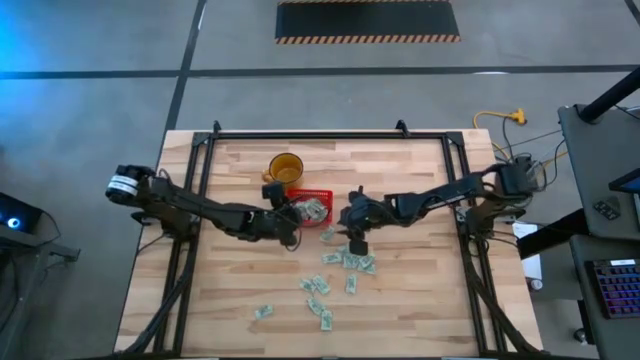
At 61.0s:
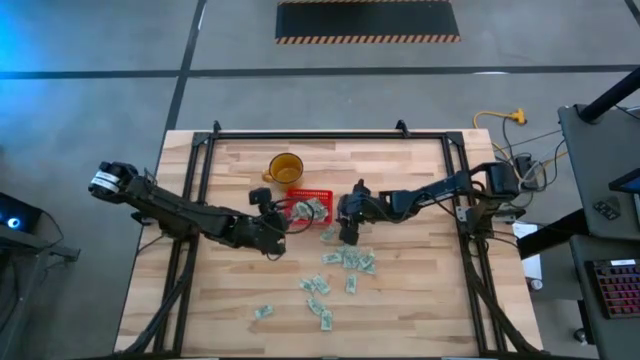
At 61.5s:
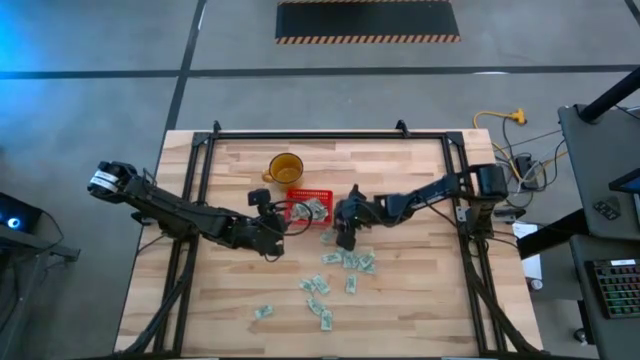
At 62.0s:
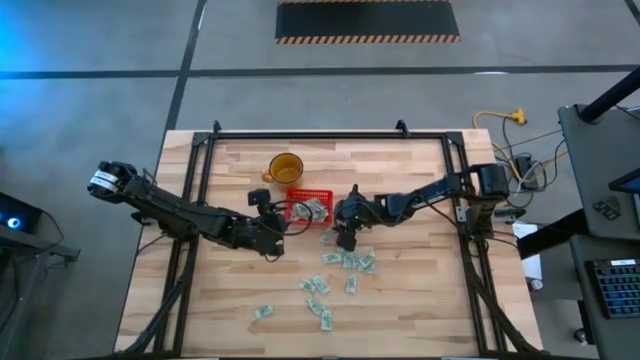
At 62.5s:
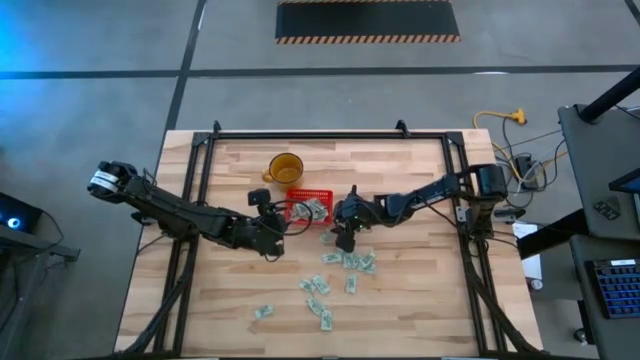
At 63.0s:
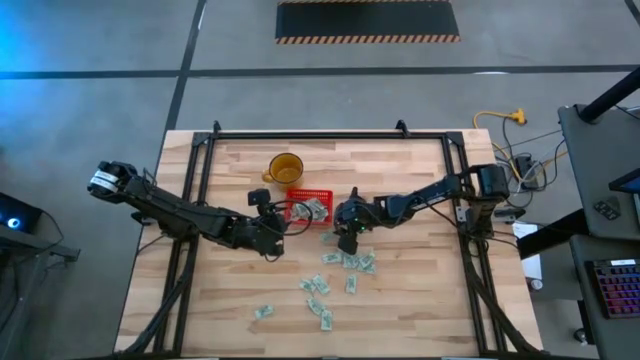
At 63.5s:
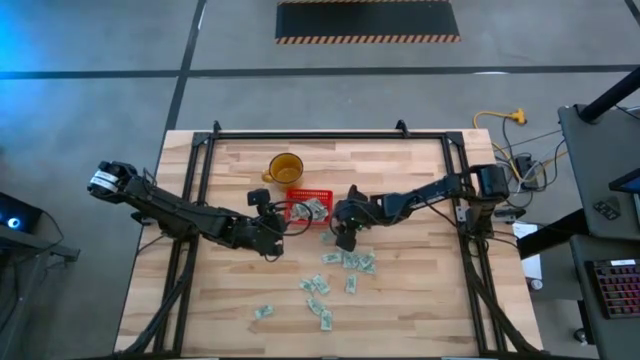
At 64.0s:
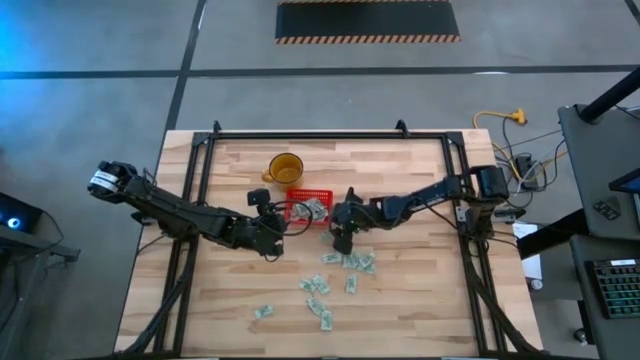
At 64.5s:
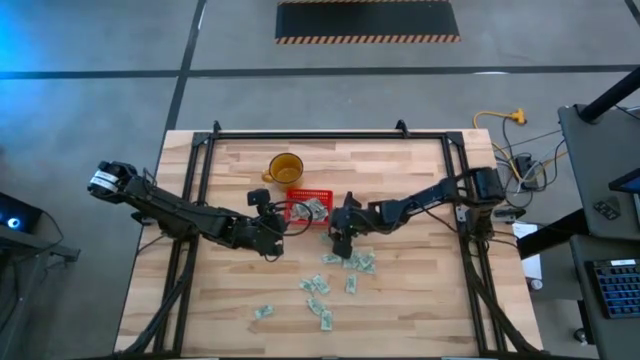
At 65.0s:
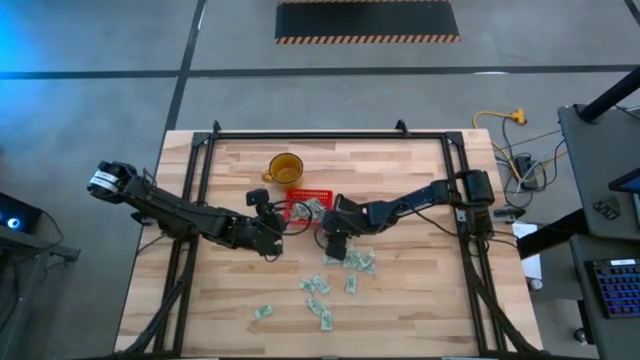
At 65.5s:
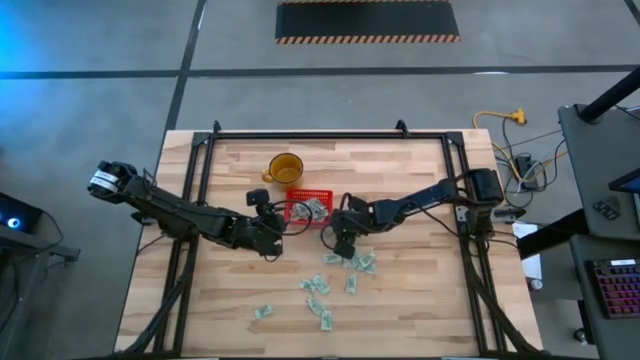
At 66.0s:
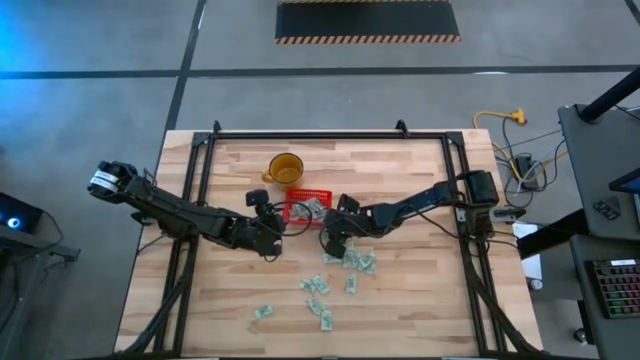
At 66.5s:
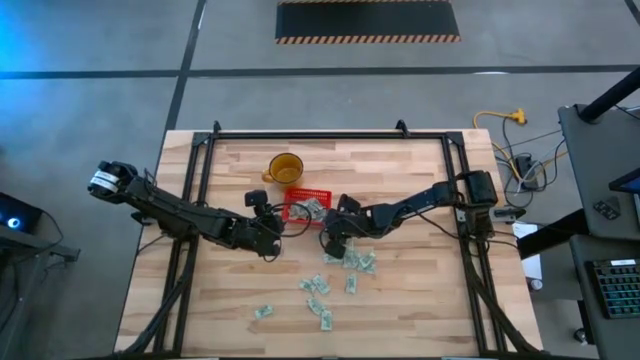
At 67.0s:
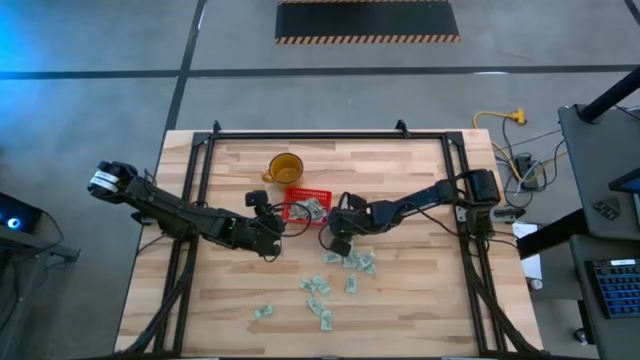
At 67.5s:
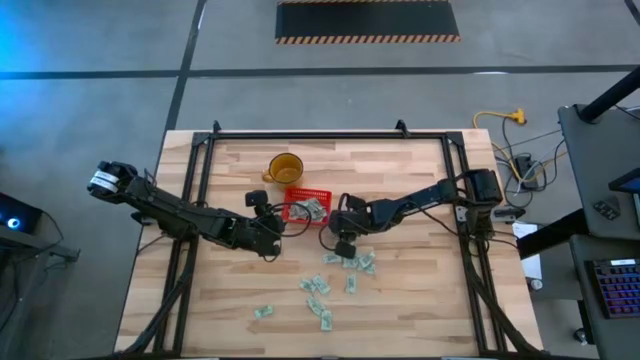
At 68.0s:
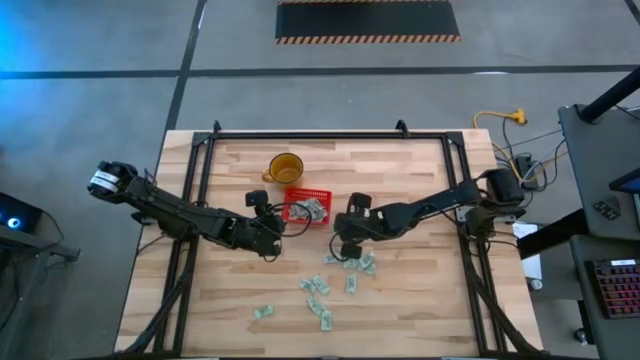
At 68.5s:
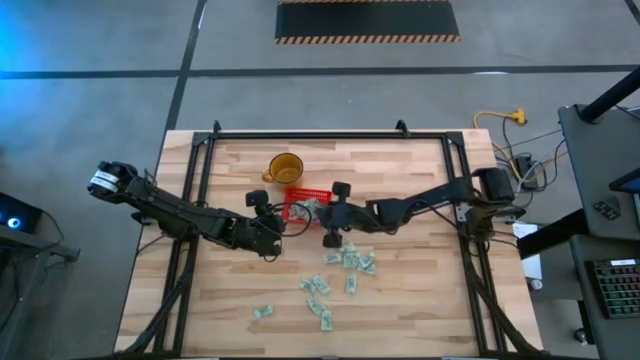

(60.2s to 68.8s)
Task: Pick and place Stevia / Truvia into bins
Put the gray stevia packet into the red basket

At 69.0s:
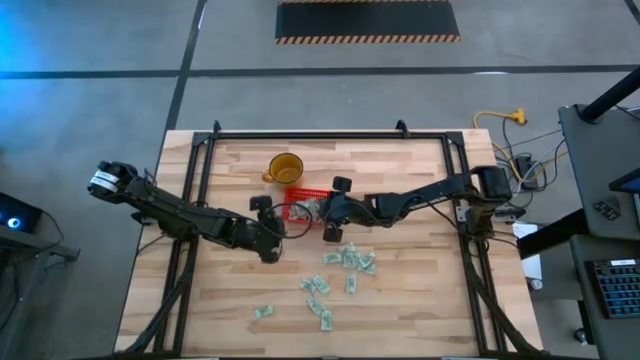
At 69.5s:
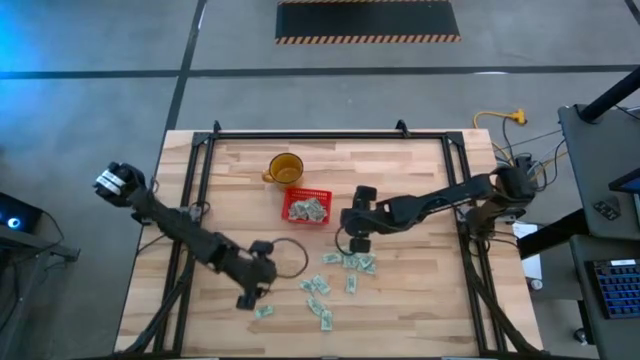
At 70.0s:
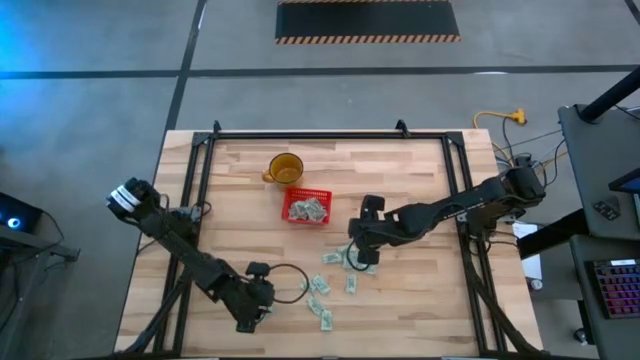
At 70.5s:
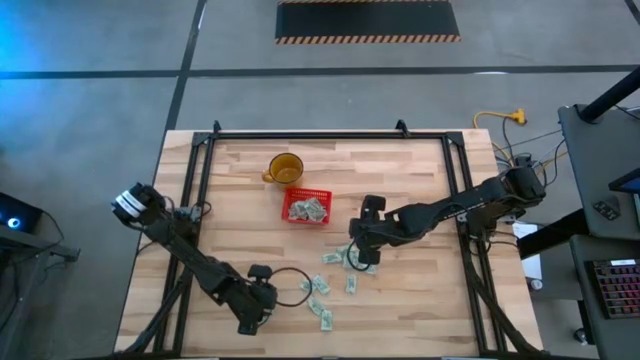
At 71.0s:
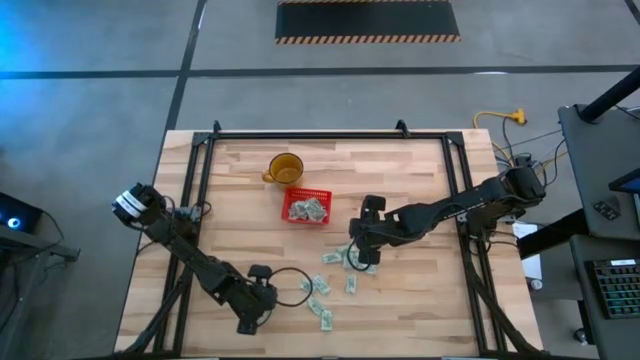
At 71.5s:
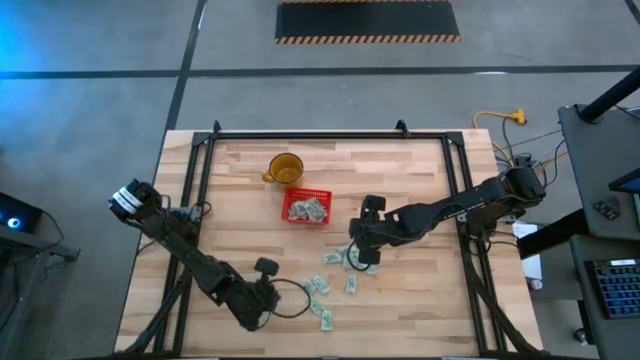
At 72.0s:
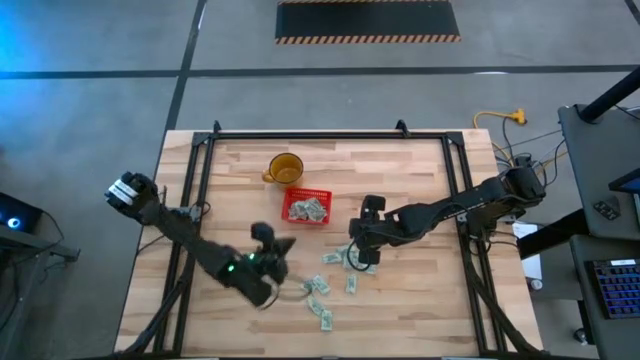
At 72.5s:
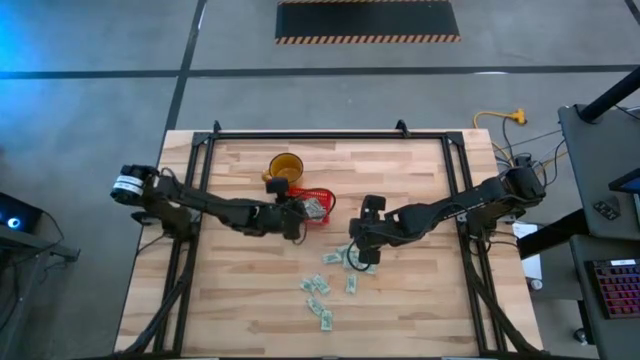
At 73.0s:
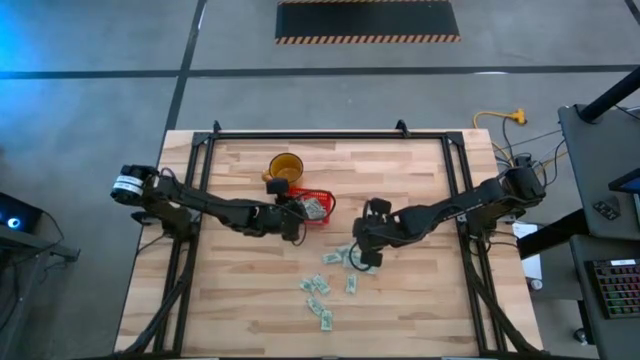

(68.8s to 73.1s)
Put the gray stevia packet into the red basket

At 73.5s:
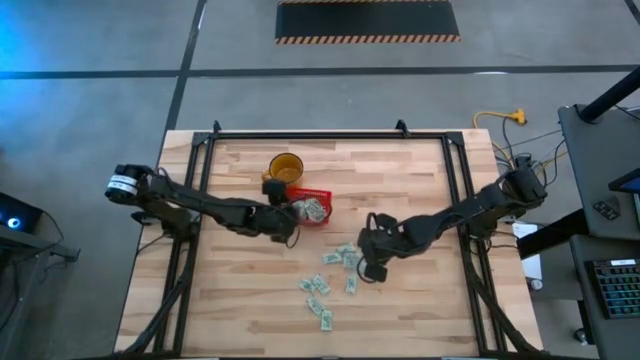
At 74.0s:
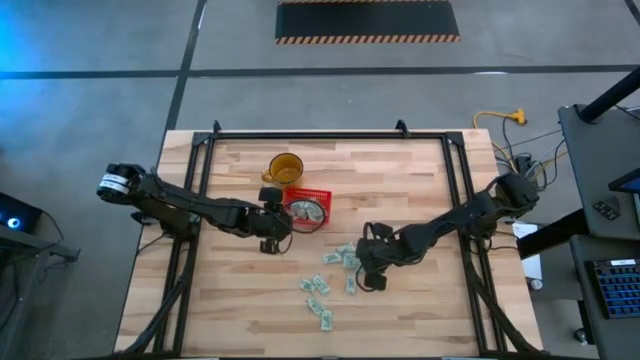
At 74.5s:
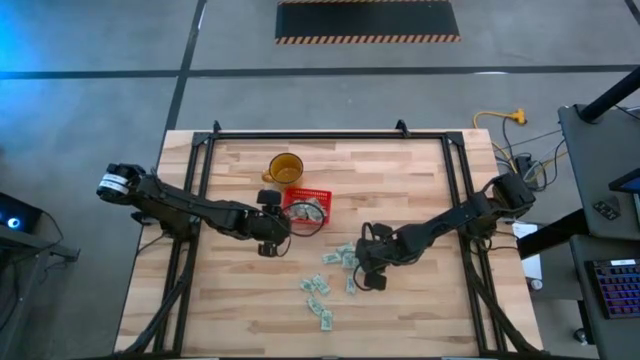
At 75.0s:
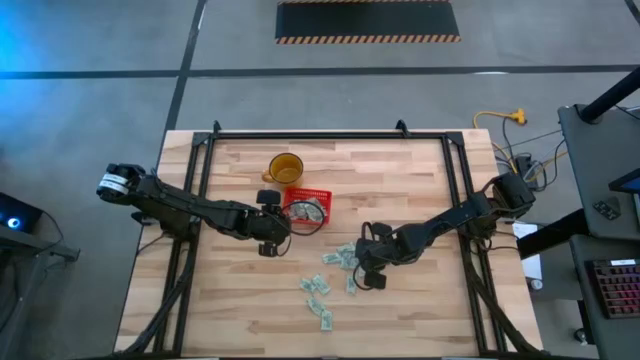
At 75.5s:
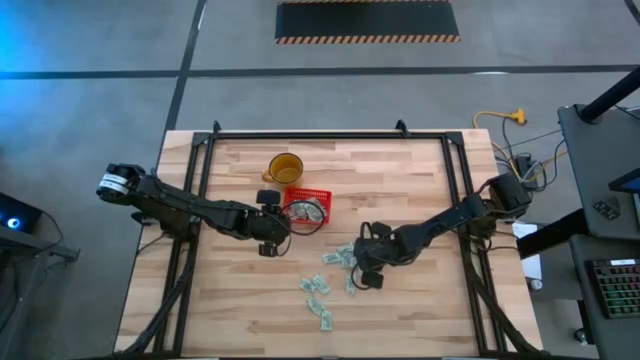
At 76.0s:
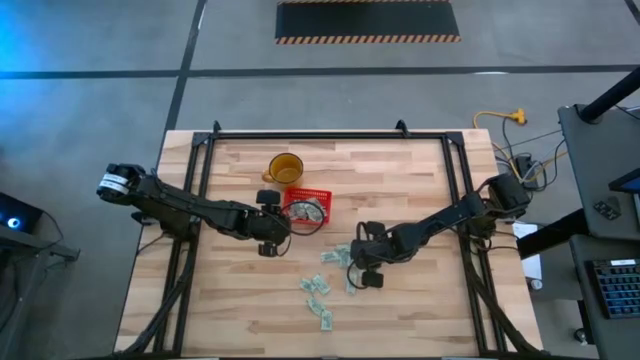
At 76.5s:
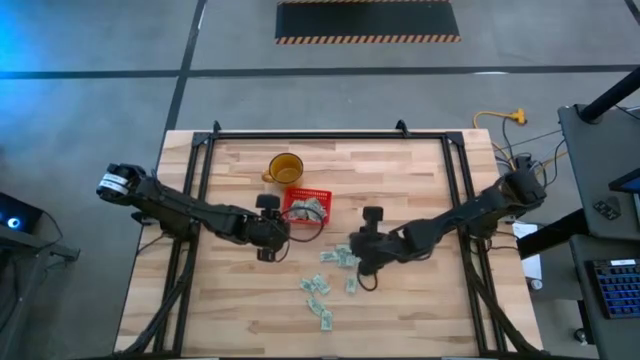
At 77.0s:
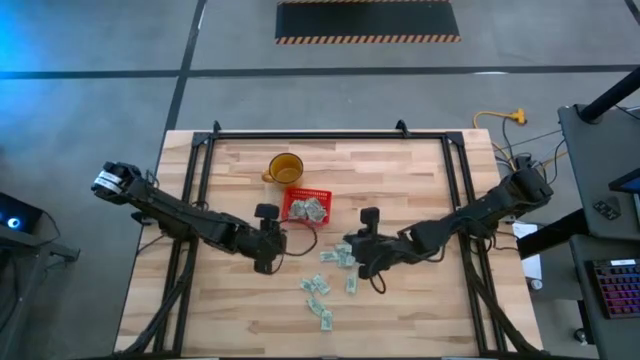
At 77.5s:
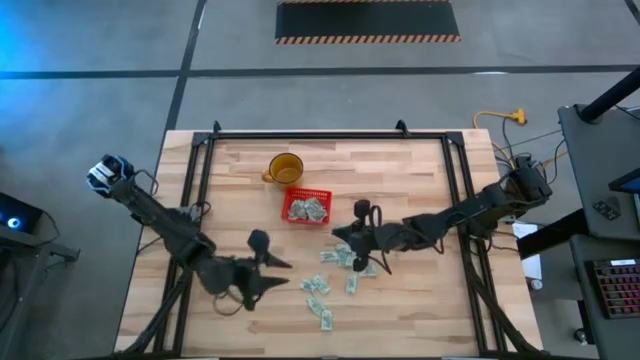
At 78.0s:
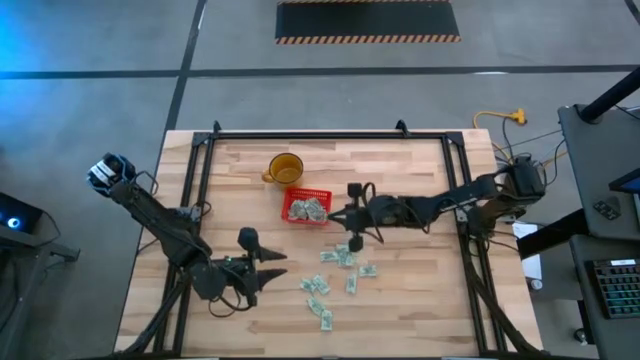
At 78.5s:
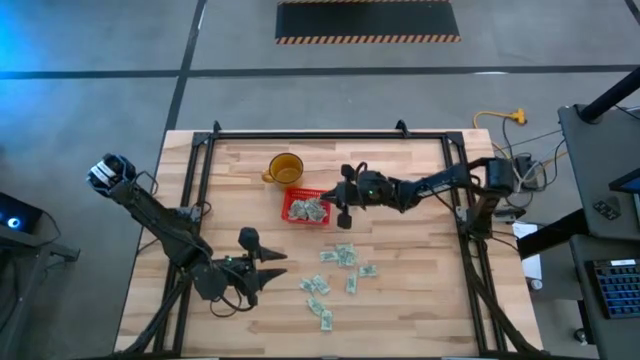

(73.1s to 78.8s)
Put the gray stevia packet into the red basket

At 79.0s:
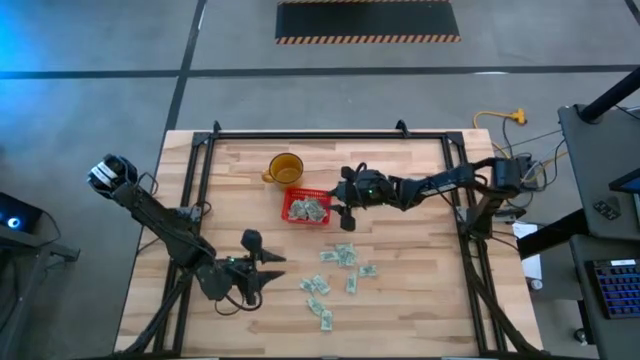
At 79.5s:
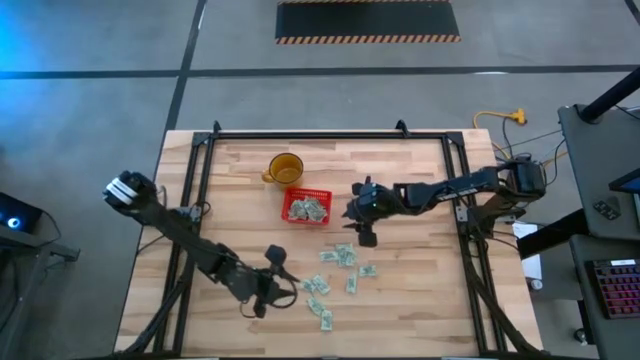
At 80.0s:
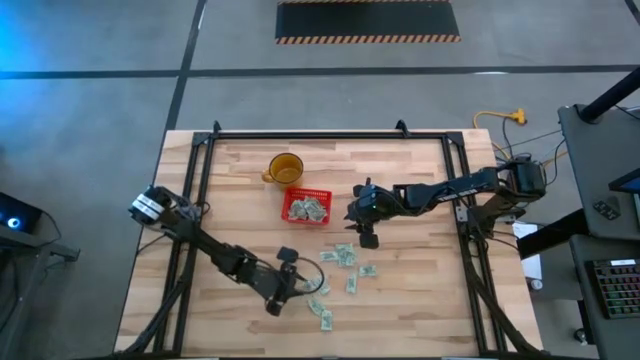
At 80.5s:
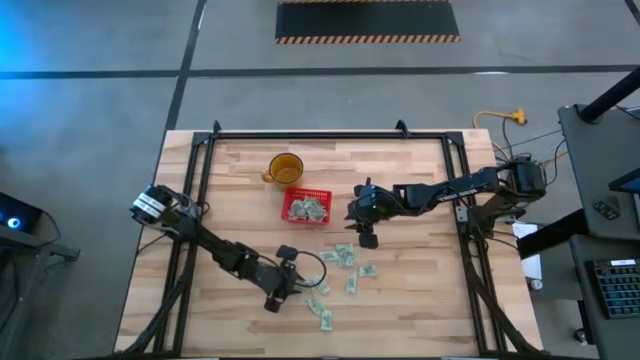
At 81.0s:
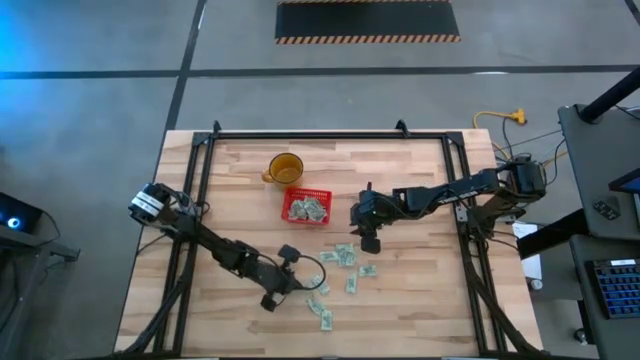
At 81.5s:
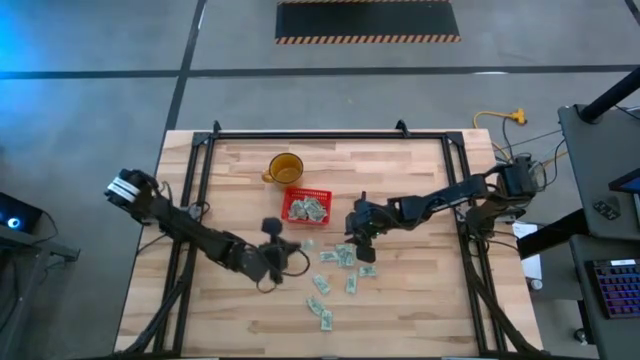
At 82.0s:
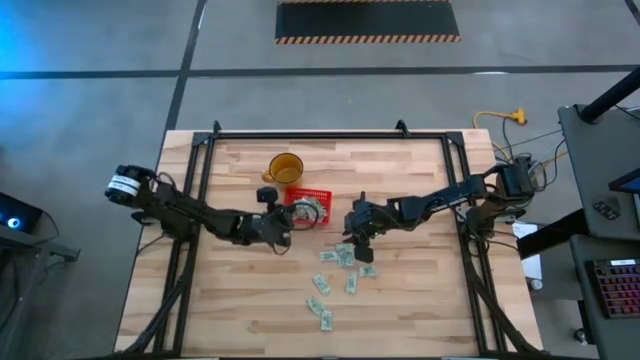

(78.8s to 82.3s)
Put the gray stevia packet into the red basket
